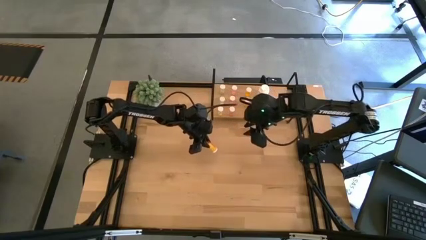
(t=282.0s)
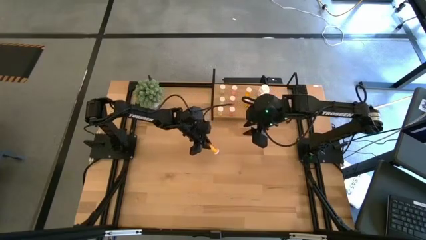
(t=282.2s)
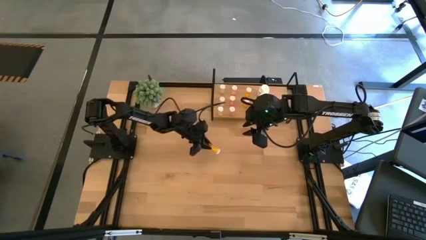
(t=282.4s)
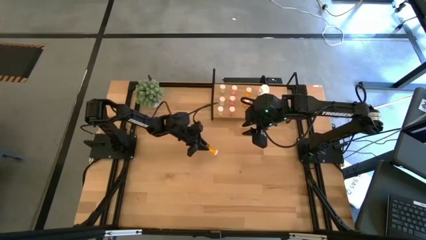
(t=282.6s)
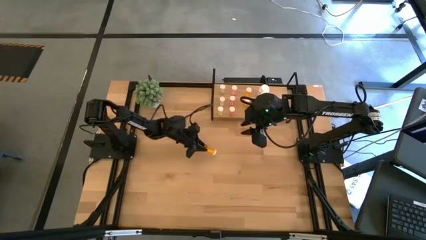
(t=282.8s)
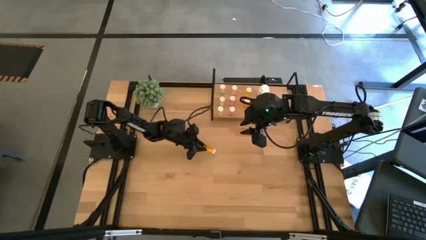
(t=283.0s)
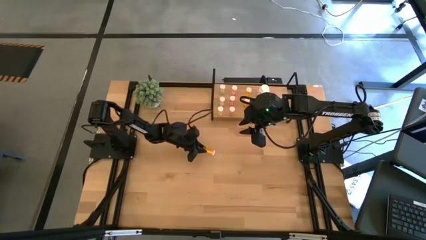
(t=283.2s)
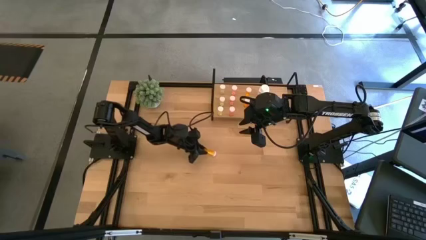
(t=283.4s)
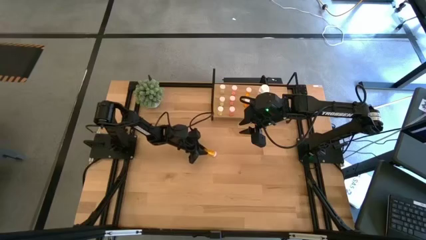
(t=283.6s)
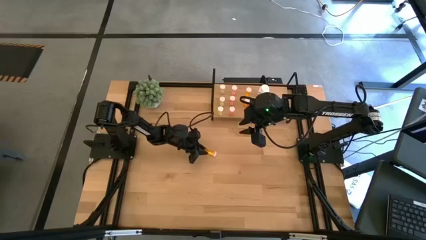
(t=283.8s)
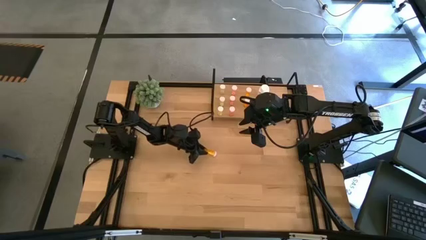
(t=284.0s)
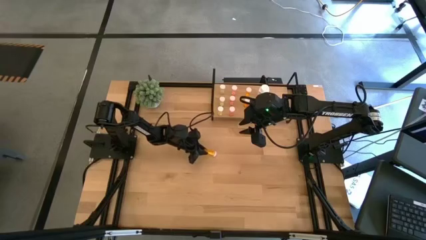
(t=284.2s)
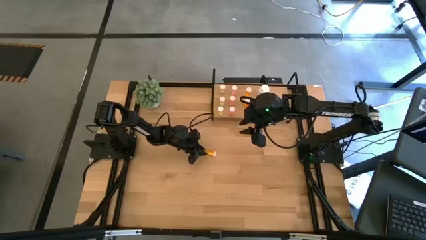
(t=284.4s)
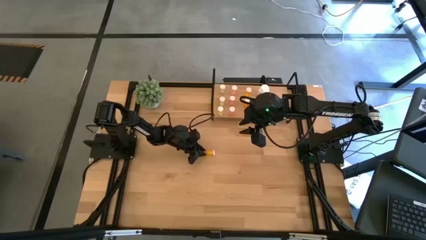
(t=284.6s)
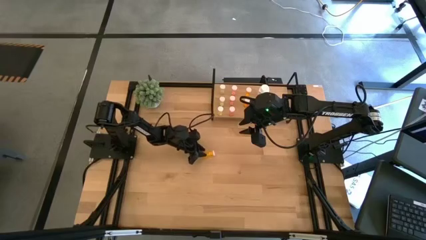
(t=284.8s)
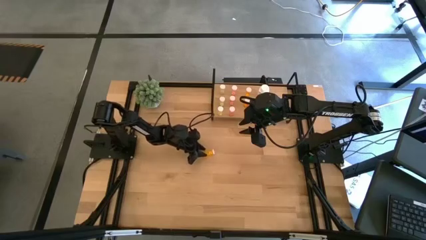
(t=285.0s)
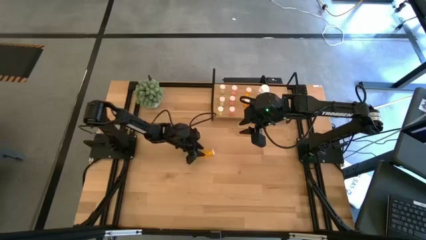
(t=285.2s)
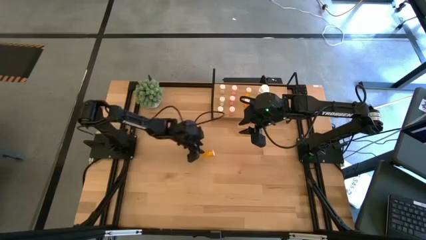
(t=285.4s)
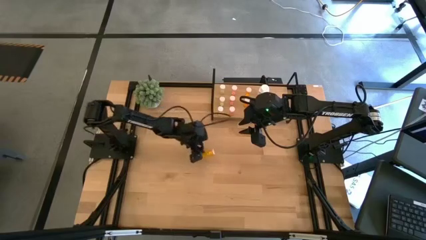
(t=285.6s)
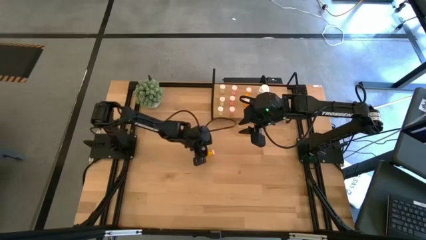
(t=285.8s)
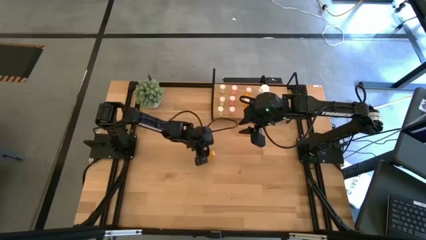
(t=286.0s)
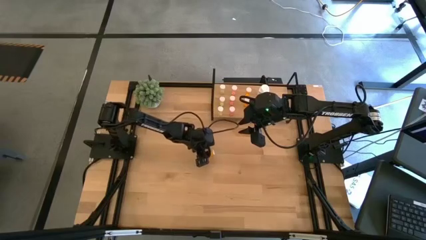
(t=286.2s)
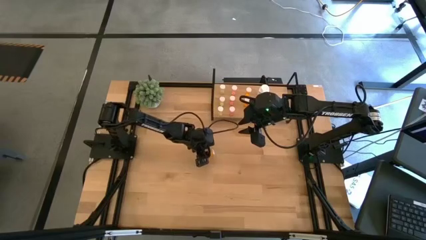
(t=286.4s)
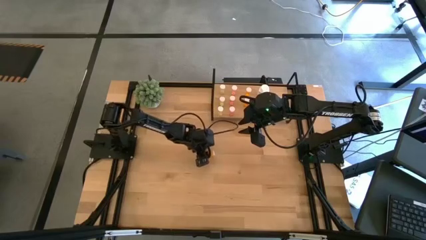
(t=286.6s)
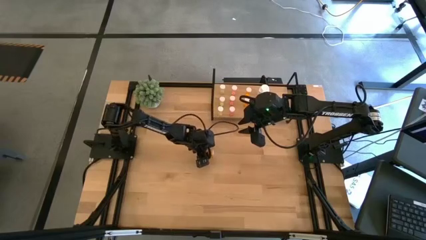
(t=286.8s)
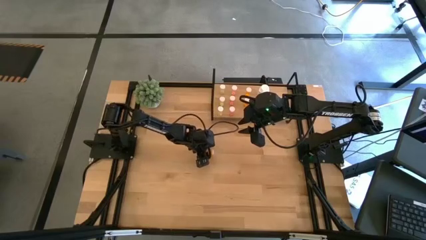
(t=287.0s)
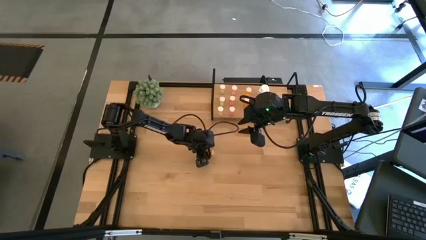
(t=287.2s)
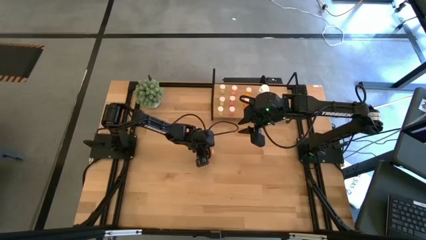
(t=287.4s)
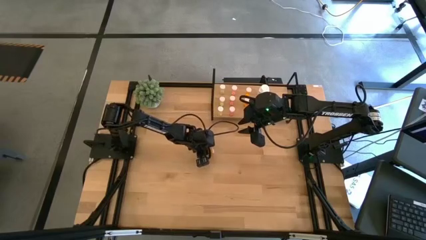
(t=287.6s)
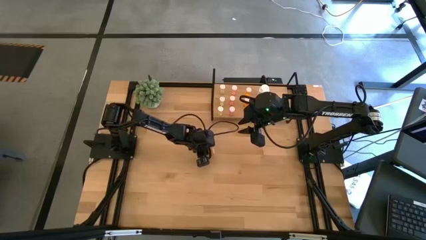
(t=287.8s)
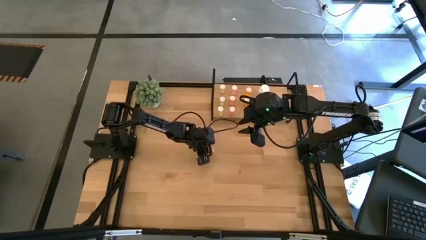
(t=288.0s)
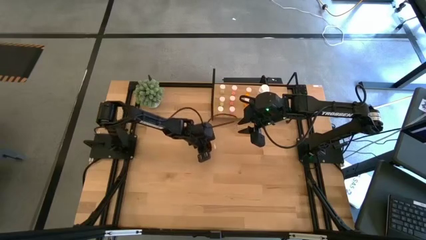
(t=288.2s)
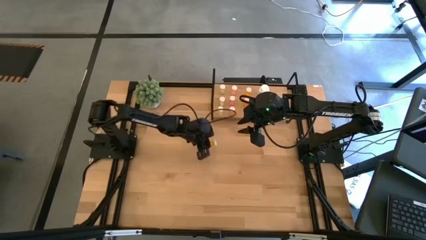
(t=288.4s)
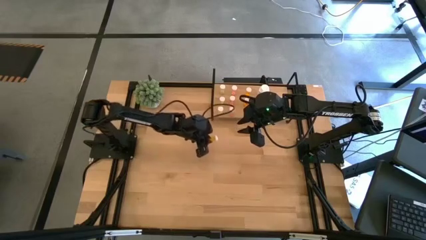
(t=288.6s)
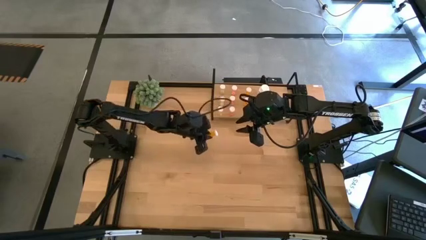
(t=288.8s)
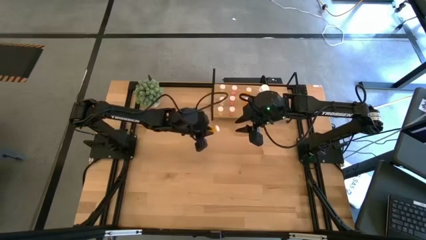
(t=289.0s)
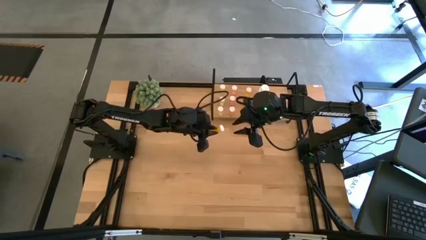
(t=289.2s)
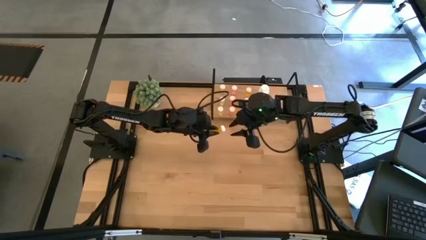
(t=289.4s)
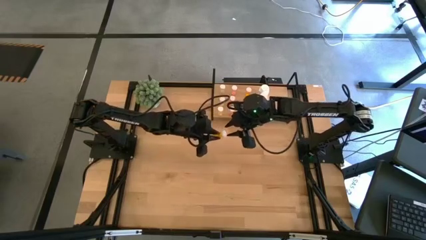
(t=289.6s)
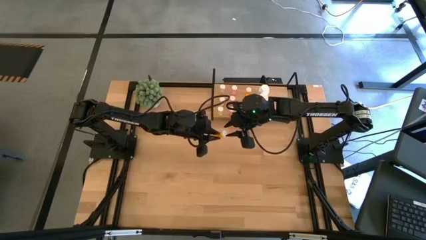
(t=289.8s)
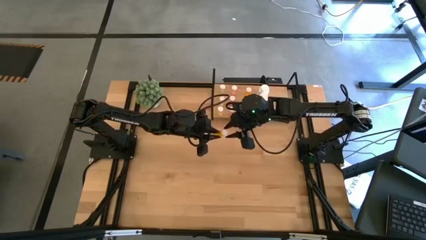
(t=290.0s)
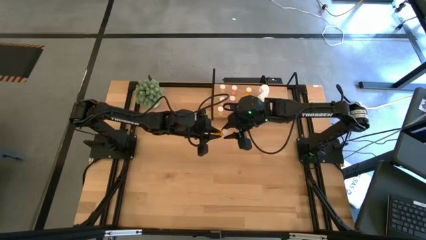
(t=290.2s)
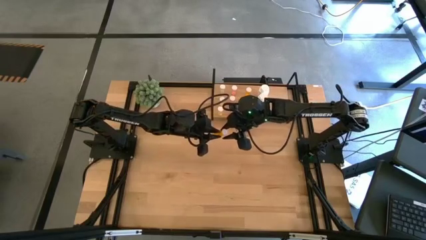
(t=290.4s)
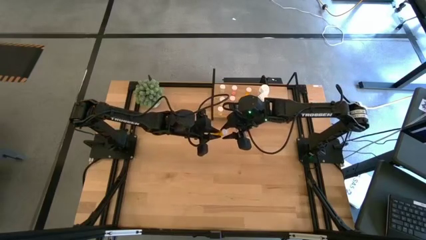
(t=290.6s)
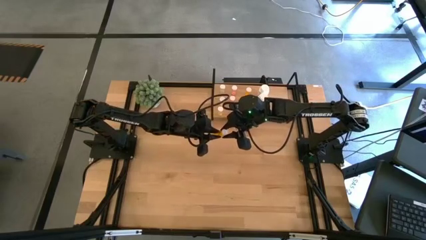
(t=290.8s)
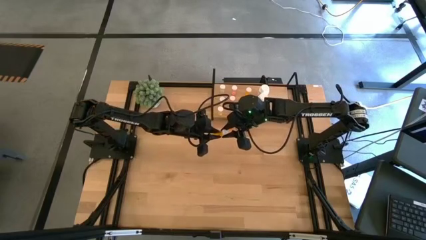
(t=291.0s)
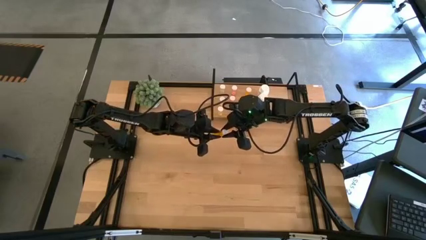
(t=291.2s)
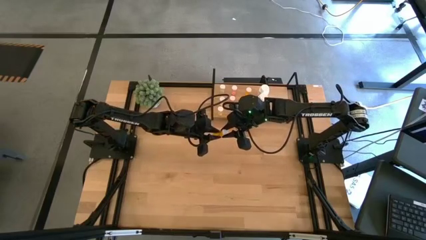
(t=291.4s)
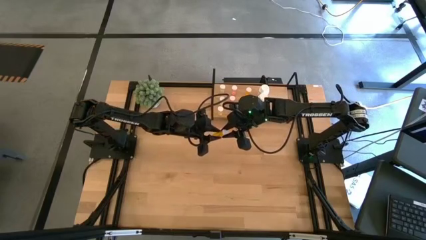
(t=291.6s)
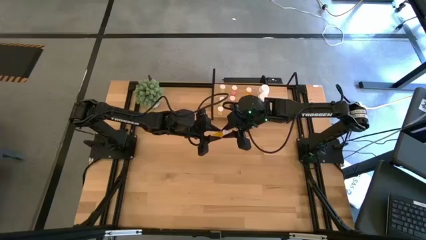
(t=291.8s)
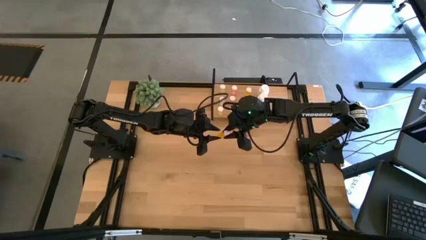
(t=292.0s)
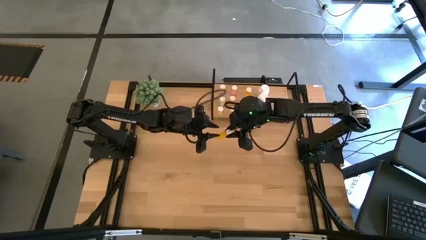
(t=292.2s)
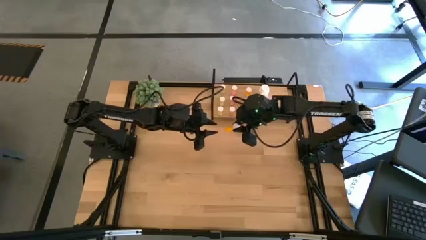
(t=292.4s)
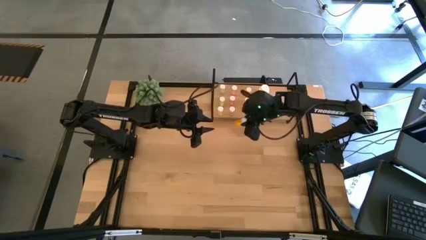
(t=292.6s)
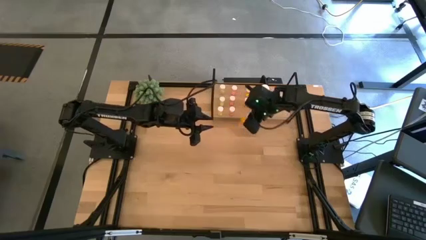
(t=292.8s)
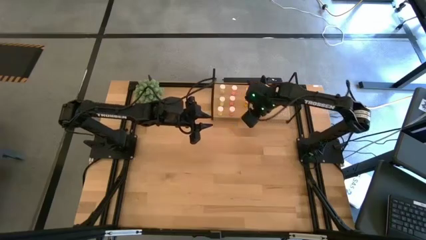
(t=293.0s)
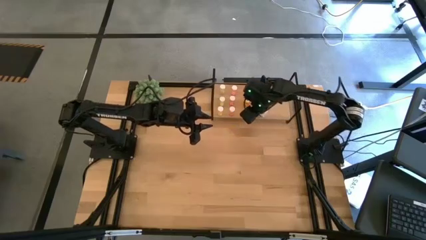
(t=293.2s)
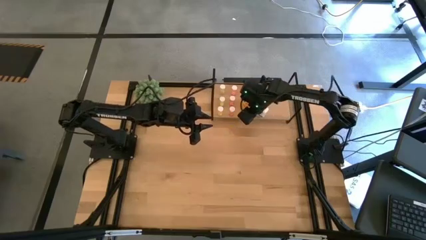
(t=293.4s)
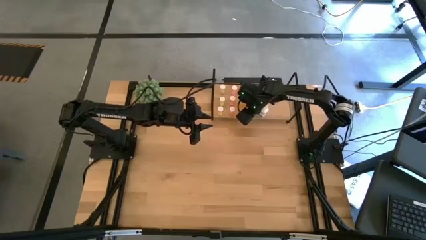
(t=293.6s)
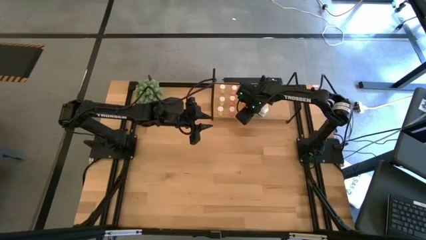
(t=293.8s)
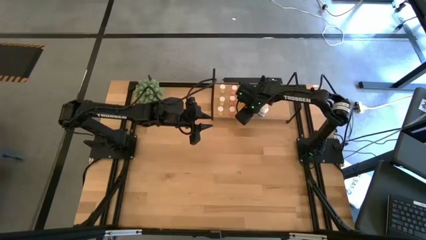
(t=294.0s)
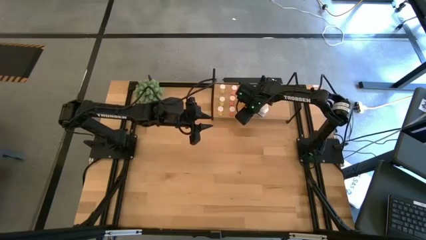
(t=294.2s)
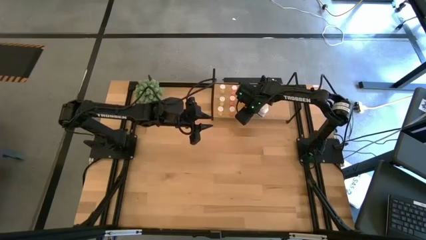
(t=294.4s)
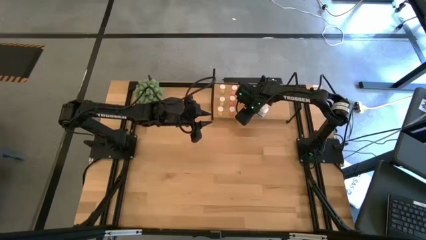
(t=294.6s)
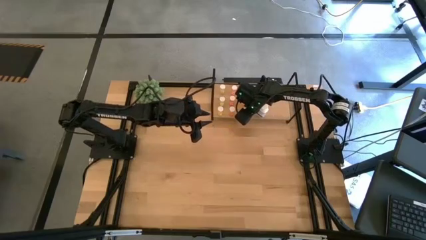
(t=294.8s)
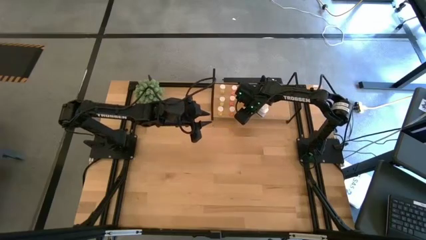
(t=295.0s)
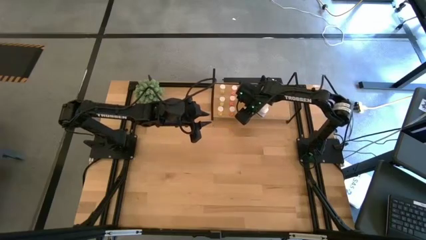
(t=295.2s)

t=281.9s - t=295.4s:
Task: Pick and place medicine bottles onto shelf by color
Put the orange pill bottle on the shelf aligned with the other orange pill bottles

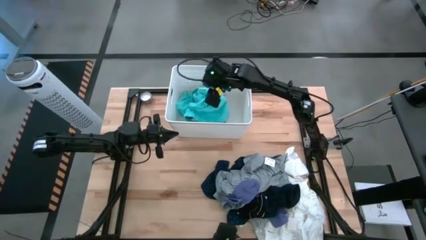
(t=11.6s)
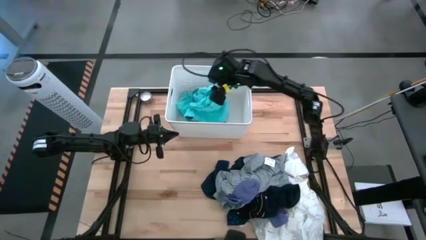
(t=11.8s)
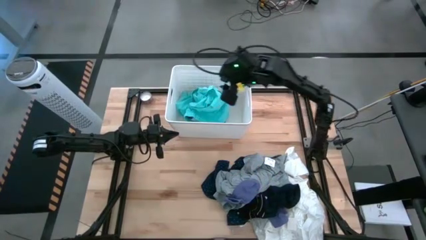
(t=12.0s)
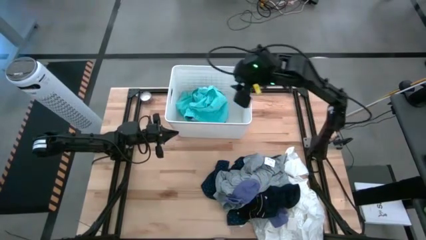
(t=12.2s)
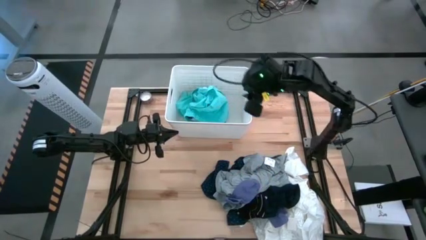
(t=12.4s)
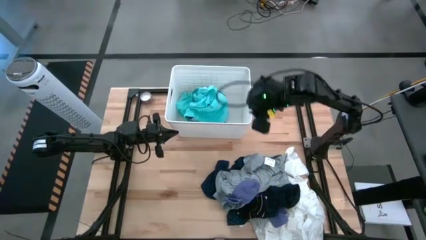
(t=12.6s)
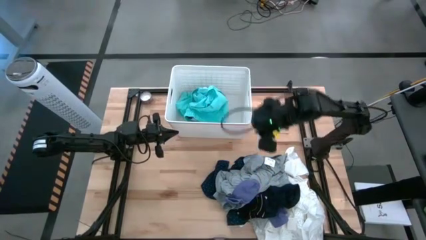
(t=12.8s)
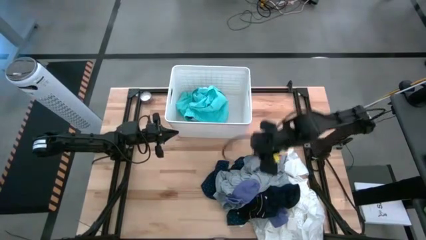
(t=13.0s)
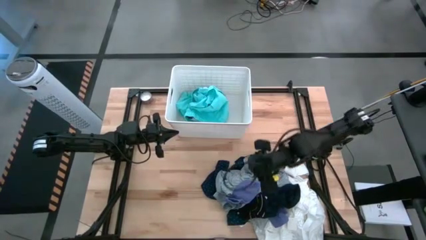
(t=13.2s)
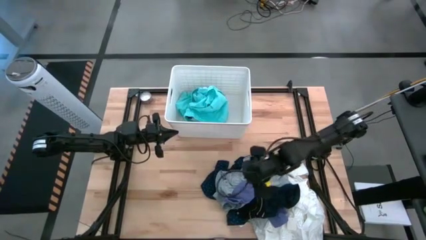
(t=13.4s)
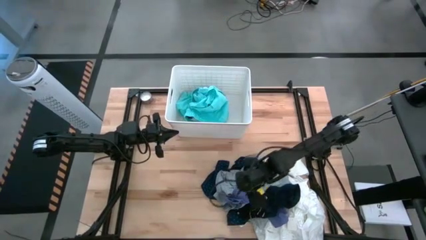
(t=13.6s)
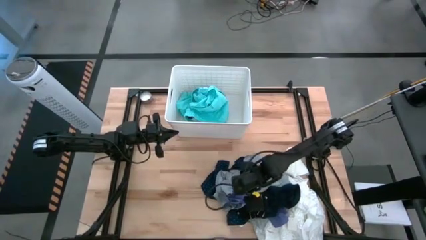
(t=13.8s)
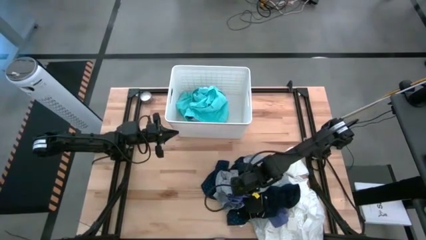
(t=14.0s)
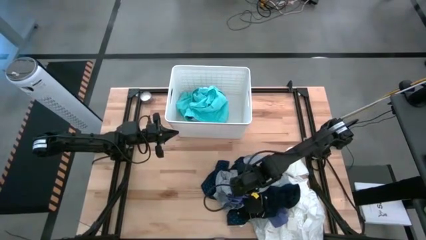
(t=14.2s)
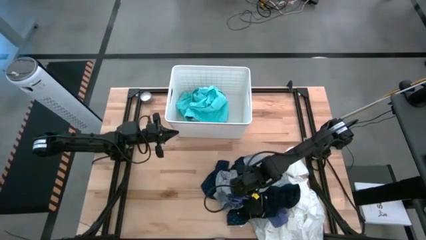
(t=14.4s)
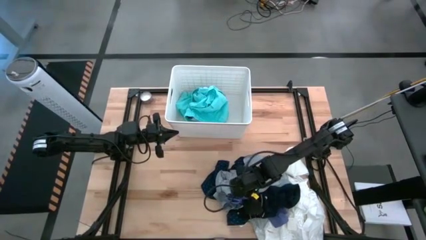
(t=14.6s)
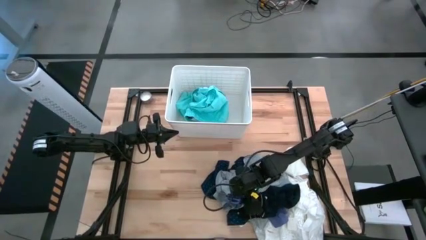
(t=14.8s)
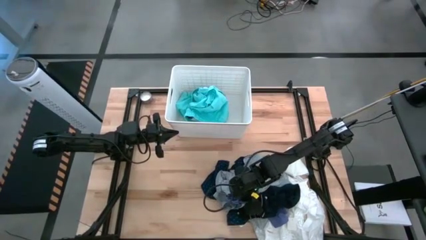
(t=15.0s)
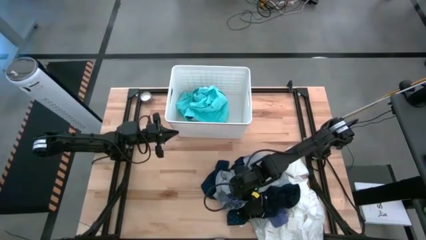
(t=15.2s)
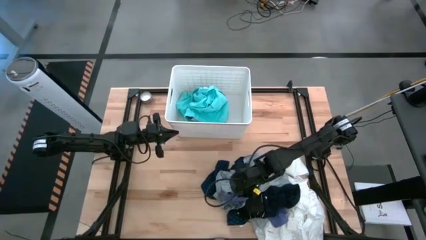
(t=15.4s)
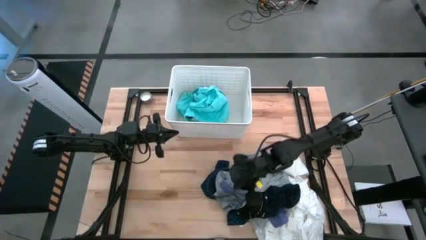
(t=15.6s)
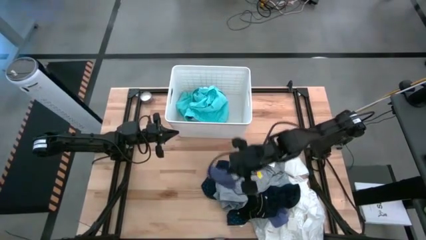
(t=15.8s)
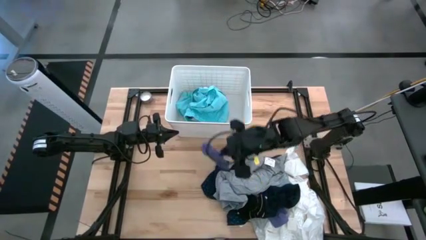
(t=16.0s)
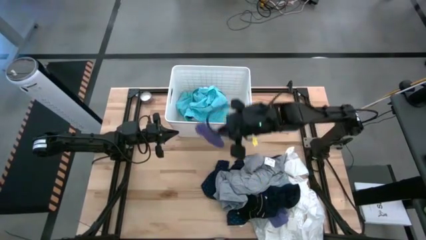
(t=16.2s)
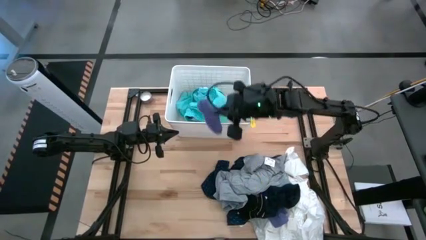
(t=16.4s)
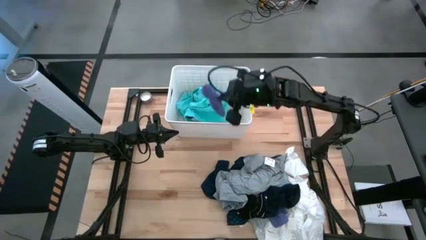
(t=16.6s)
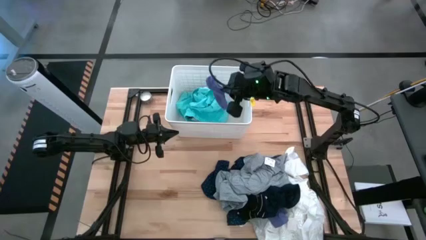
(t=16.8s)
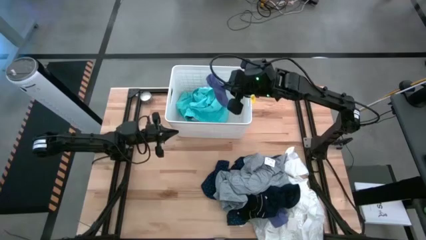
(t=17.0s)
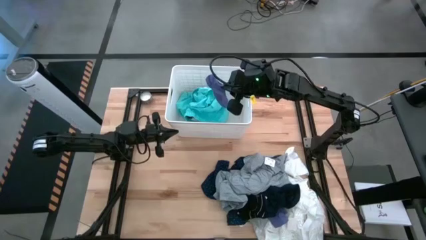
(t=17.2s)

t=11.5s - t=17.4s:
Task: Sort clothes
Put the blue sock into the laundry organizer
